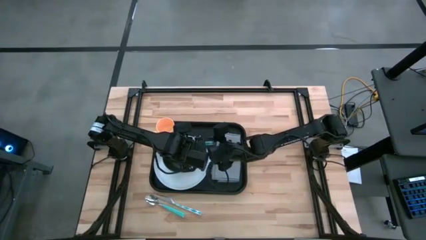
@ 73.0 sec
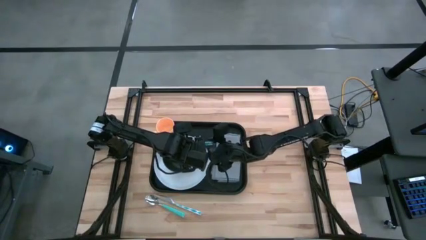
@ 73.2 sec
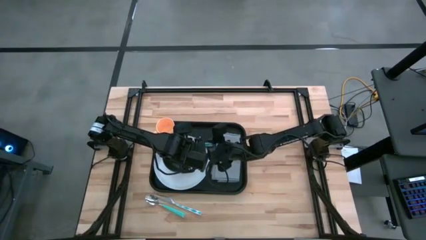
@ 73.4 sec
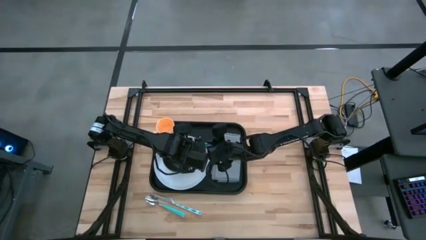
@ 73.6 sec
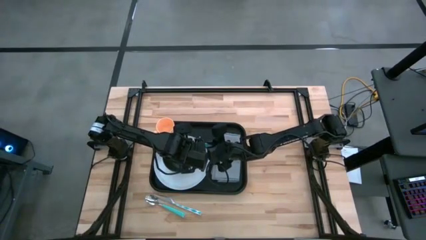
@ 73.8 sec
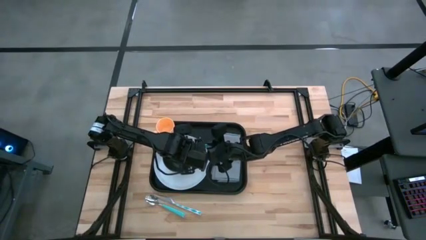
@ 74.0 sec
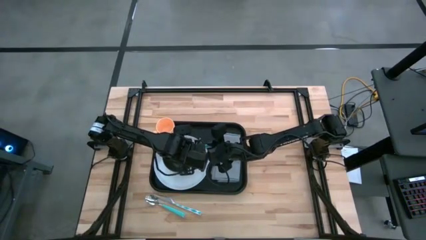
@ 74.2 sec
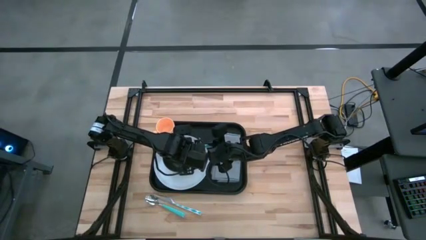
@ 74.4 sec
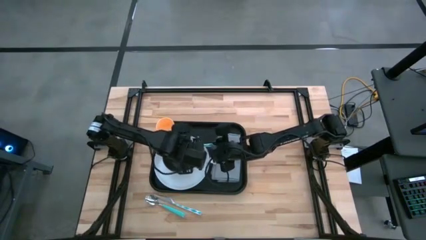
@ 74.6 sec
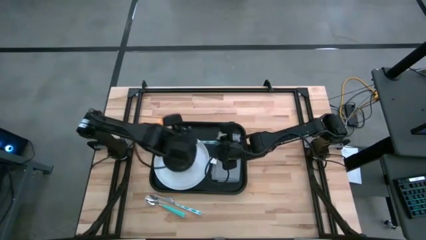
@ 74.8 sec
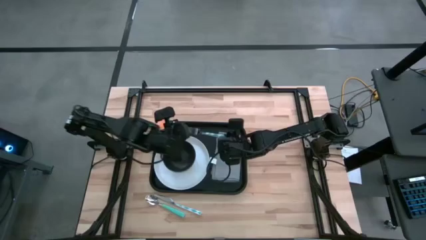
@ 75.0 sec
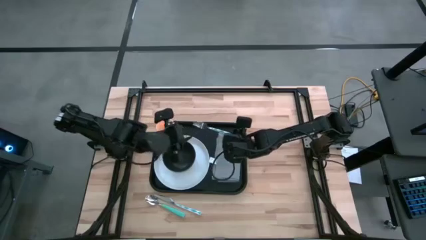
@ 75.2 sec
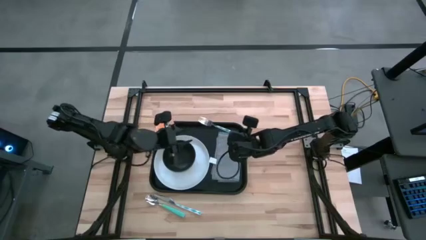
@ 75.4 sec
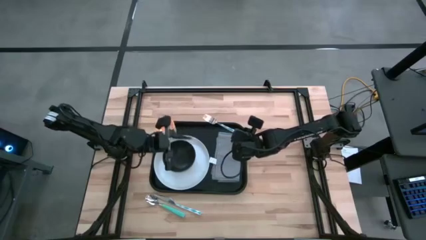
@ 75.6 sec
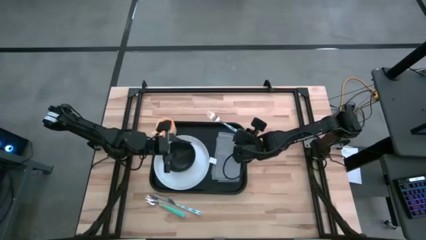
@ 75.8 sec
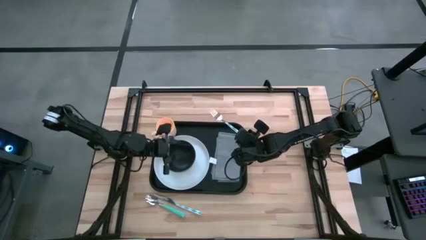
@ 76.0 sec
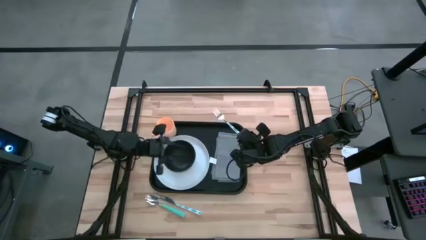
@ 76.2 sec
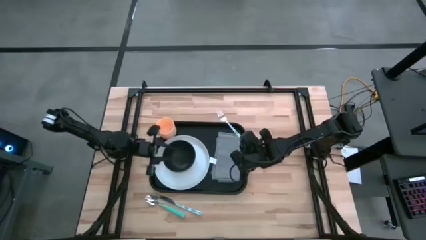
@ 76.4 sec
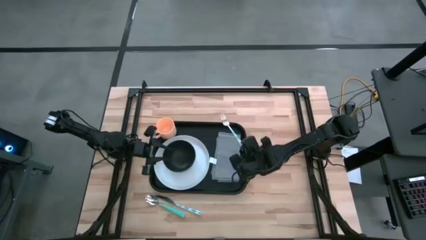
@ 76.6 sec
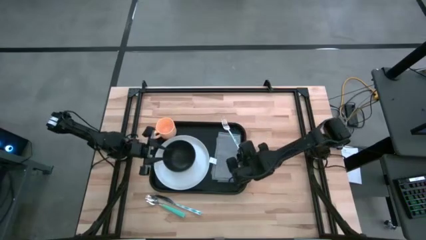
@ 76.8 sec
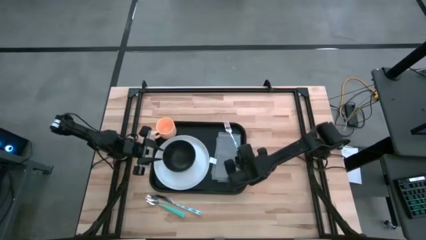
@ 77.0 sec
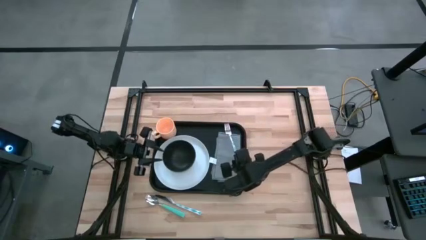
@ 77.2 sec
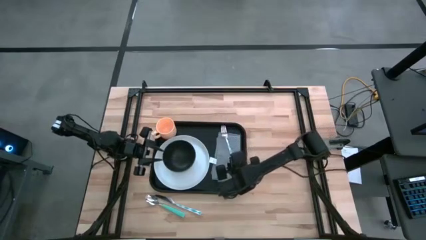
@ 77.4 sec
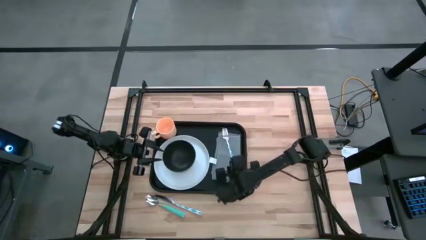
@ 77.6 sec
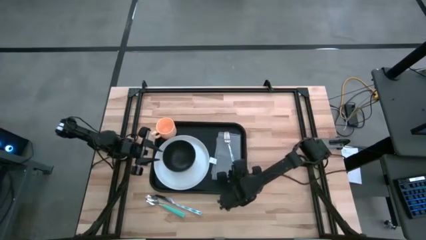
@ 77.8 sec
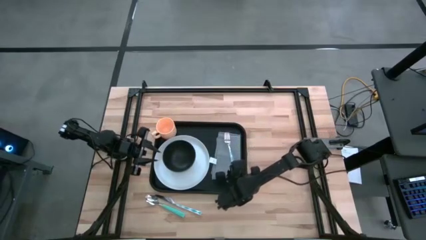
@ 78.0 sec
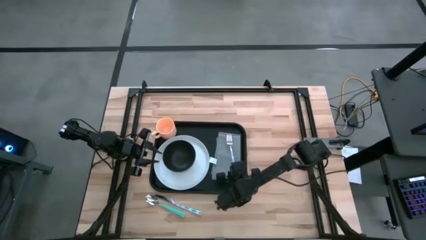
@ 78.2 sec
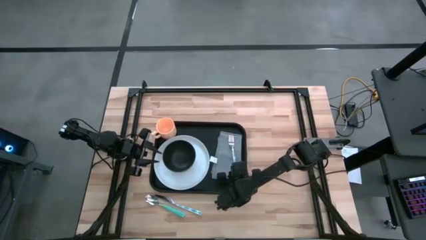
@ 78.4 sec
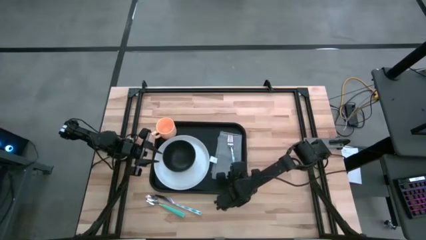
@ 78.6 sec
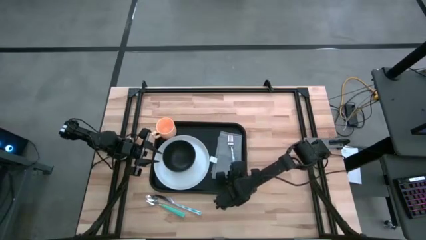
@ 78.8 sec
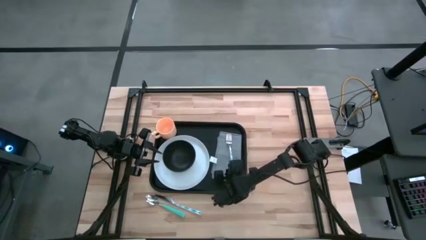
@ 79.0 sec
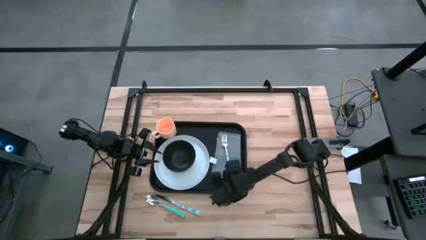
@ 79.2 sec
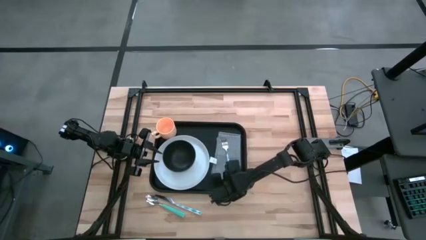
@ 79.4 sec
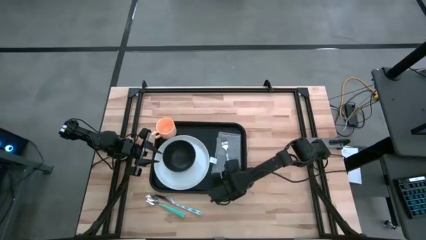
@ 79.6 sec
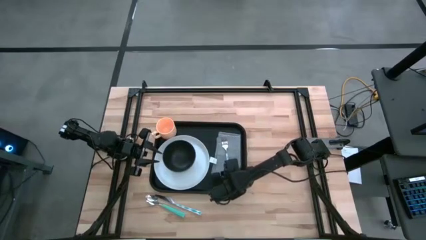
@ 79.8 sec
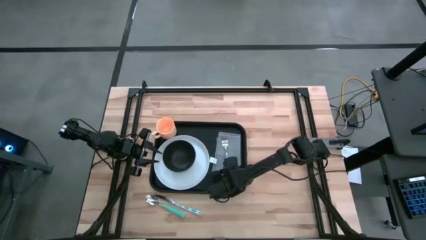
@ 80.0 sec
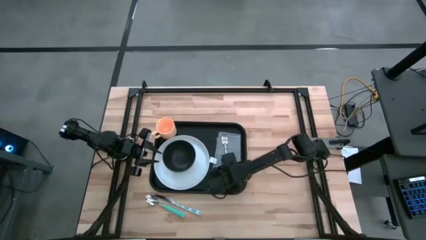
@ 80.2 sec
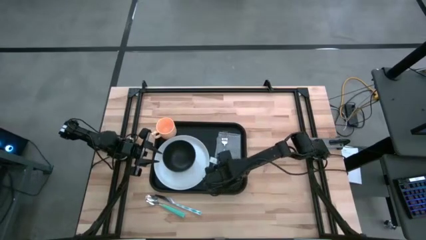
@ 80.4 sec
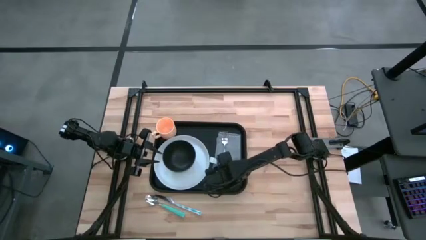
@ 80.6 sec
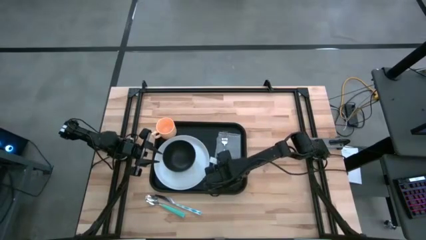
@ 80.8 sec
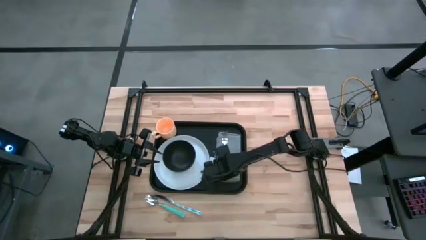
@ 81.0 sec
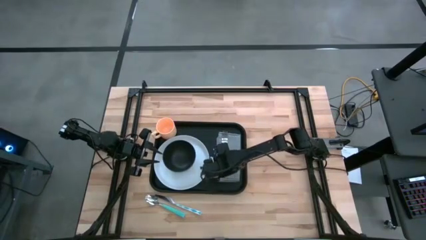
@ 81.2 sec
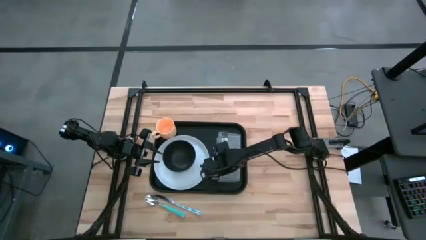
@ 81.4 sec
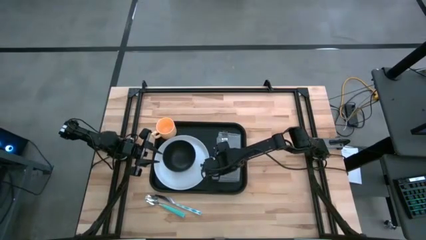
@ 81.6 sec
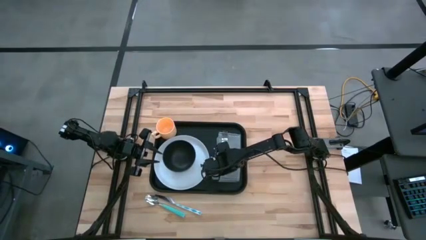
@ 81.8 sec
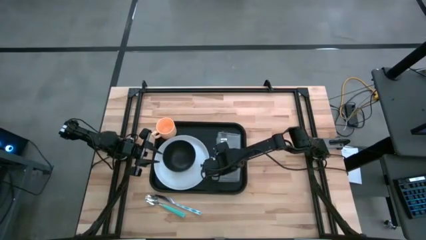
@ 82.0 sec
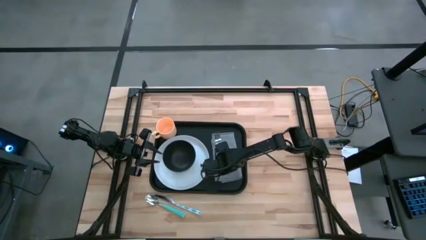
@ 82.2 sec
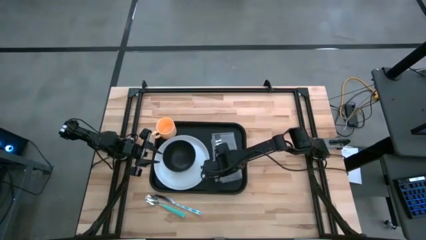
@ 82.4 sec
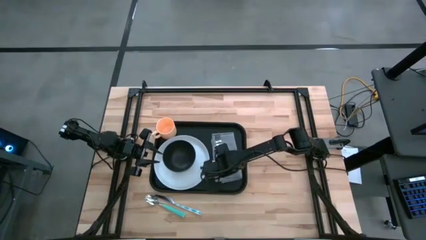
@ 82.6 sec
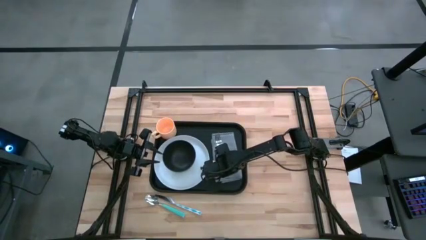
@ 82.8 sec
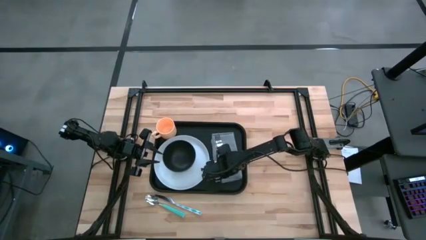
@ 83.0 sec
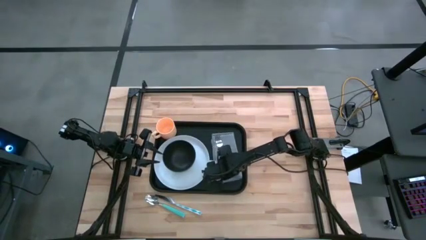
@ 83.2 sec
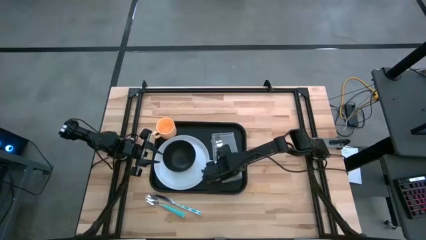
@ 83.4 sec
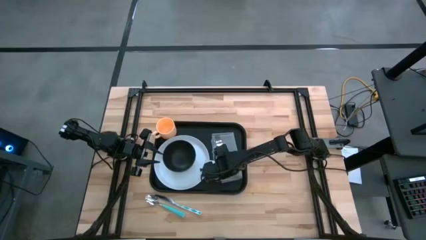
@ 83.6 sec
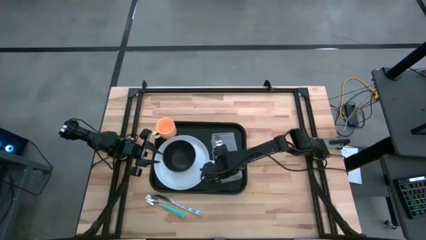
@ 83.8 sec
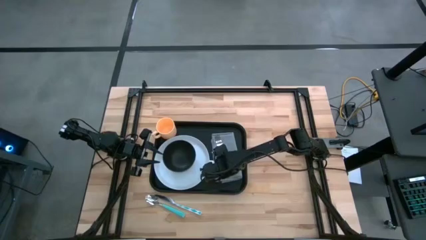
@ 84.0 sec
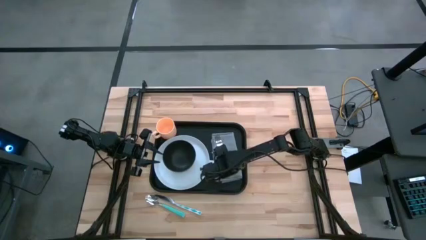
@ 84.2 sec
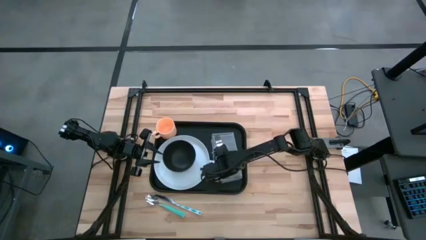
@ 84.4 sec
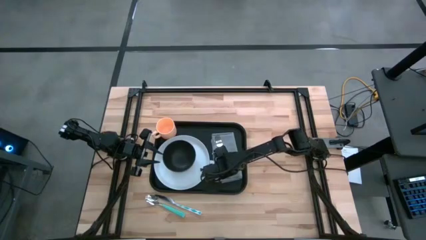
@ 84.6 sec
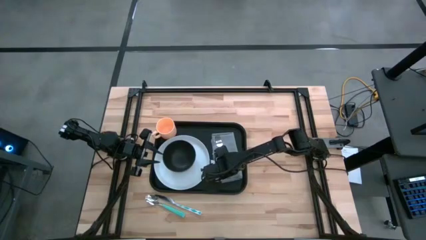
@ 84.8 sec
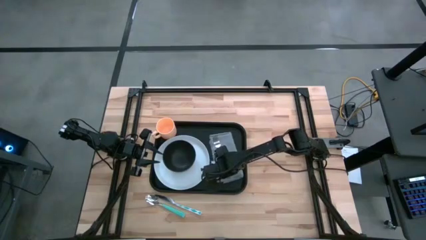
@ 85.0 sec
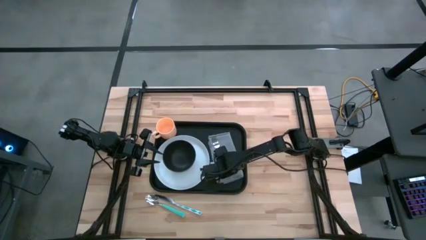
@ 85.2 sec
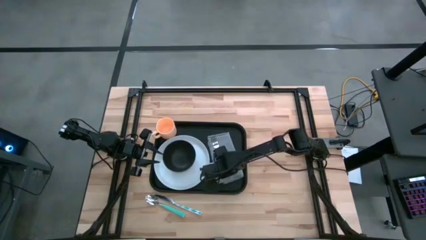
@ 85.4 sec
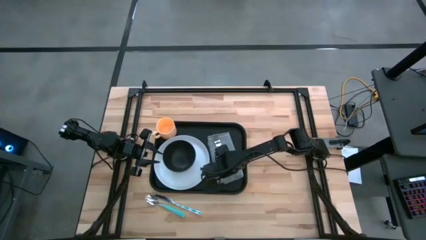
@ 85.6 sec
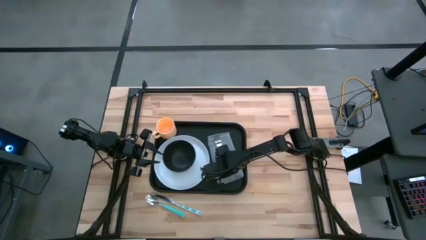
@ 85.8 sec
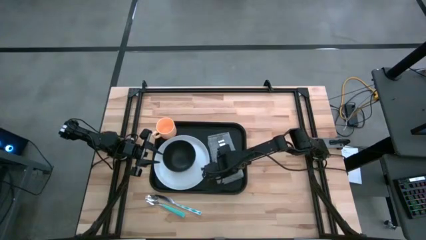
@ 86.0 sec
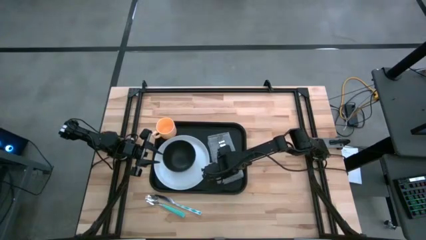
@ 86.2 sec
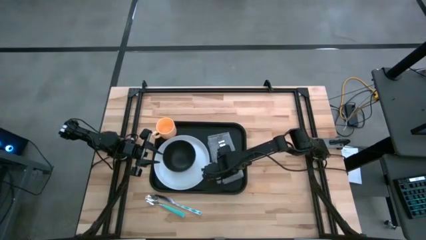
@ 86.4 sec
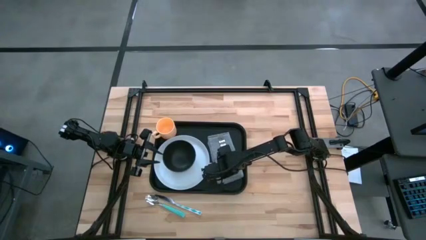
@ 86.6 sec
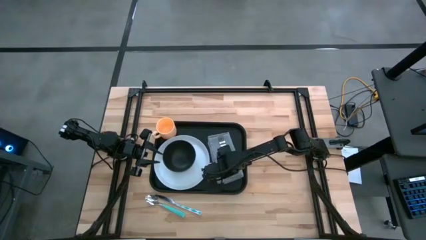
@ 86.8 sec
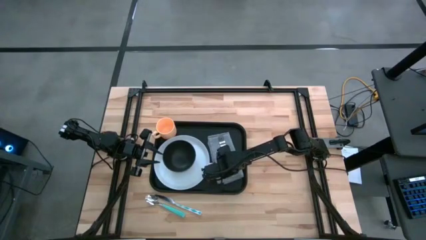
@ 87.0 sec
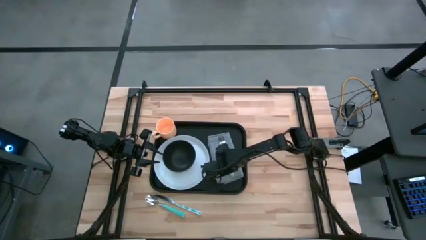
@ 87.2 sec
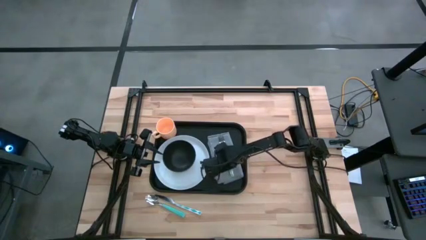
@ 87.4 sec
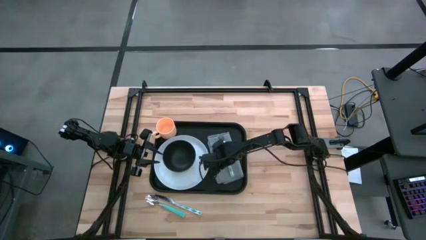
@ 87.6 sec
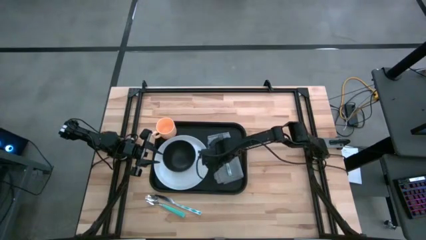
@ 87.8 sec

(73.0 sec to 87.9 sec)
Task: Set up tray
Put the green fork on the gray napkin

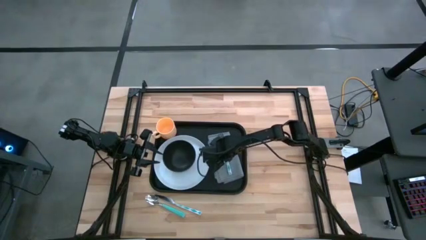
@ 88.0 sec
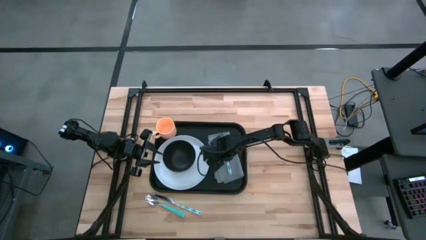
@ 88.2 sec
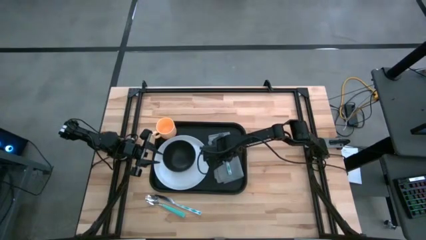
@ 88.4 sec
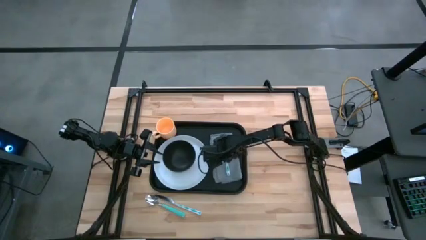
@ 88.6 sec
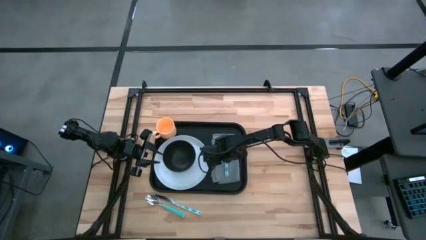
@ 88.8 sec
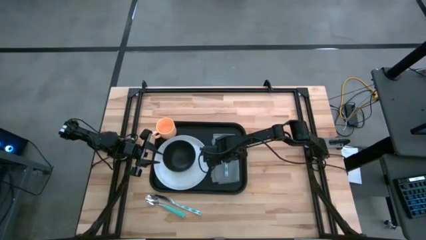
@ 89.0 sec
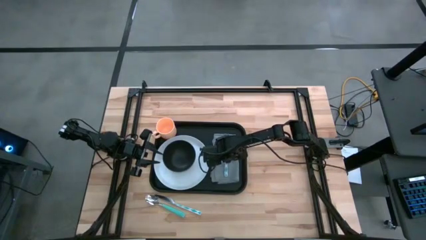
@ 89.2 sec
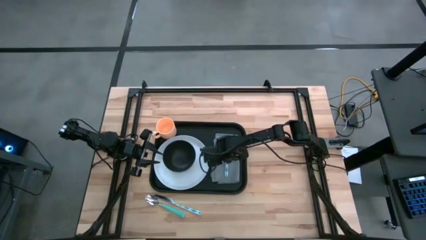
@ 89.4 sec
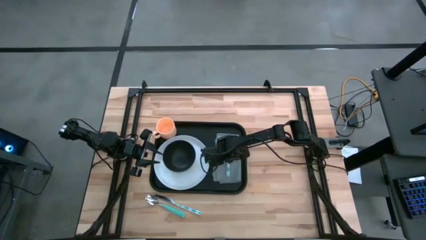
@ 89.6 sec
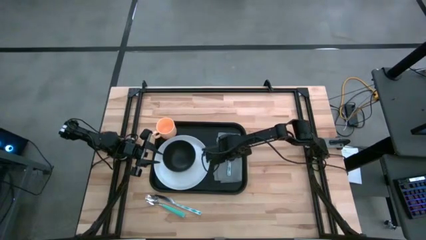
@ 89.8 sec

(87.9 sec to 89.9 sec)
Adjust the gray napkin on the black serving tray
